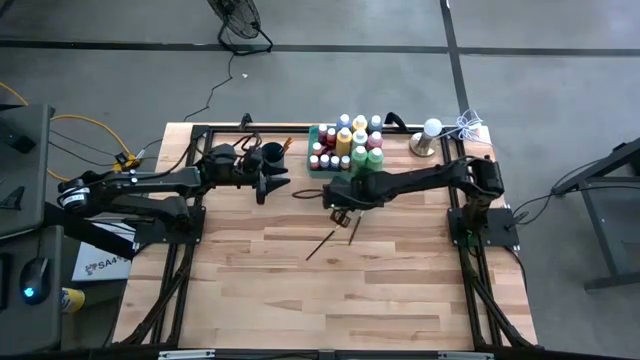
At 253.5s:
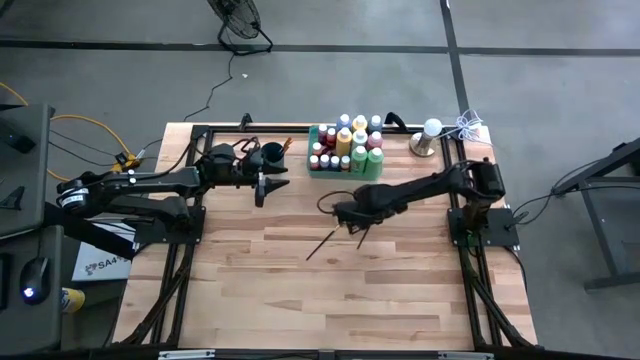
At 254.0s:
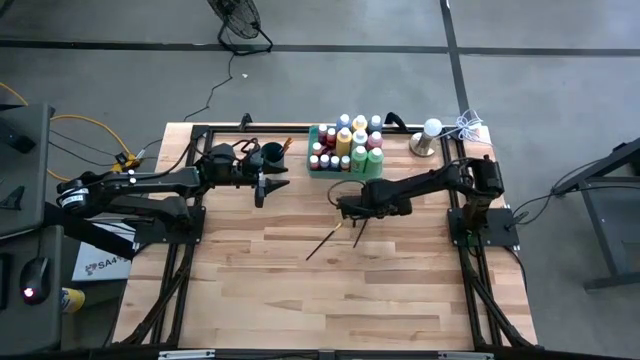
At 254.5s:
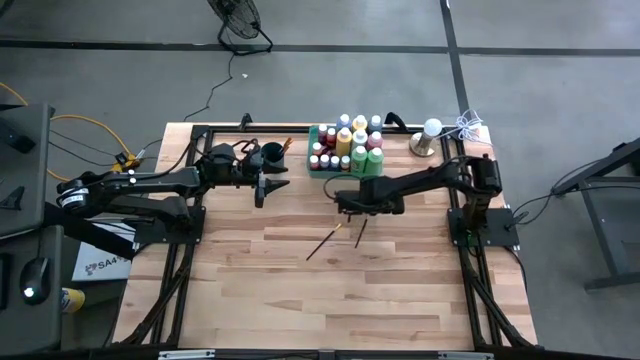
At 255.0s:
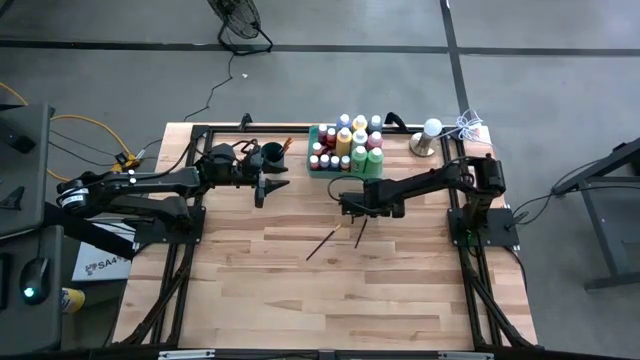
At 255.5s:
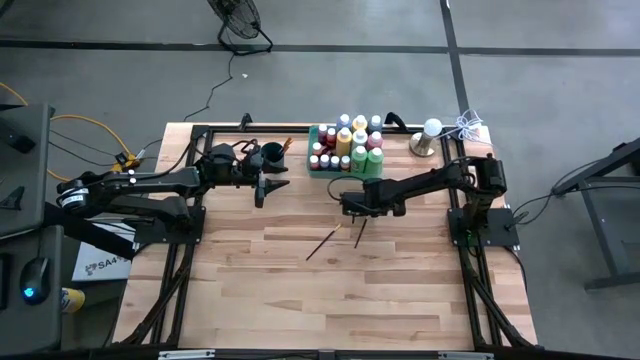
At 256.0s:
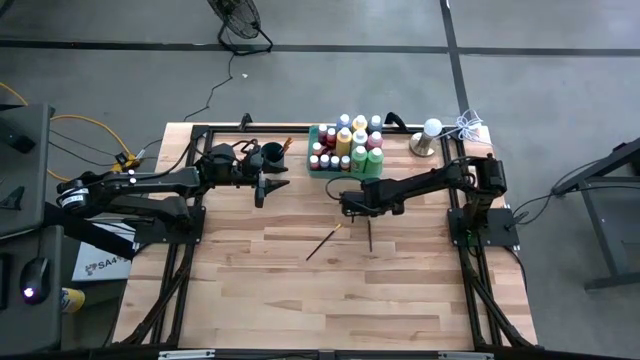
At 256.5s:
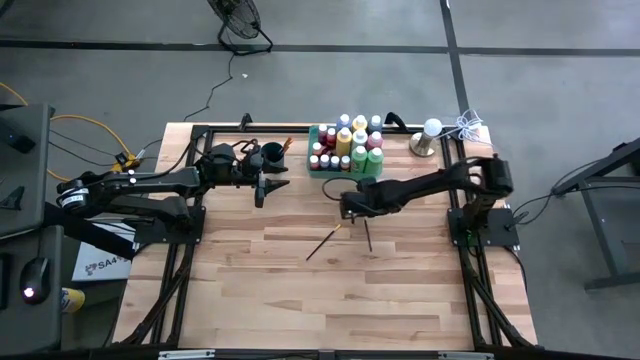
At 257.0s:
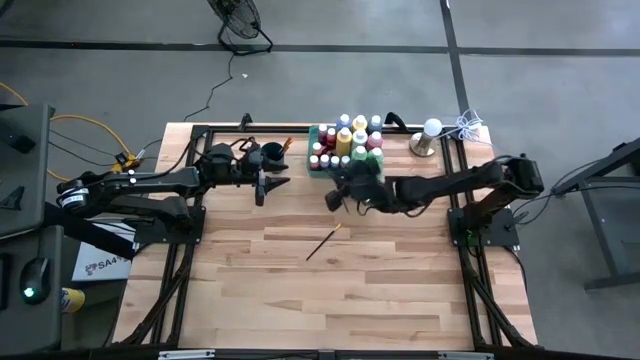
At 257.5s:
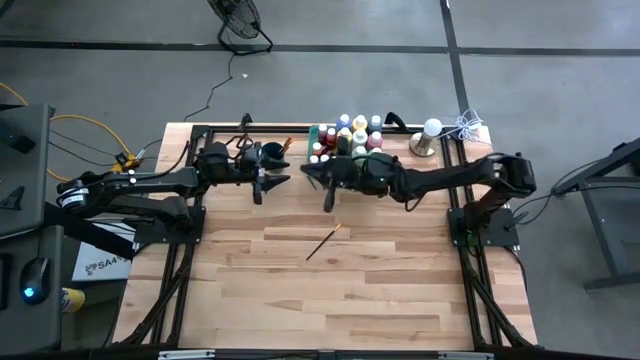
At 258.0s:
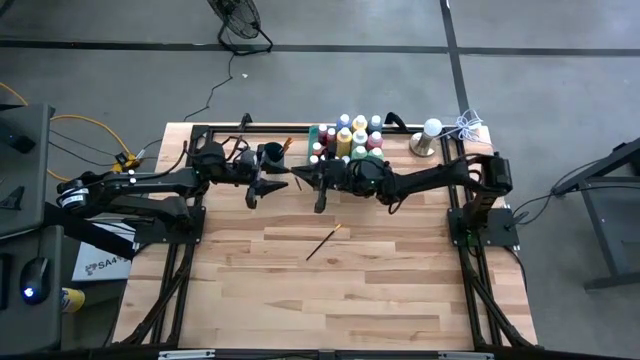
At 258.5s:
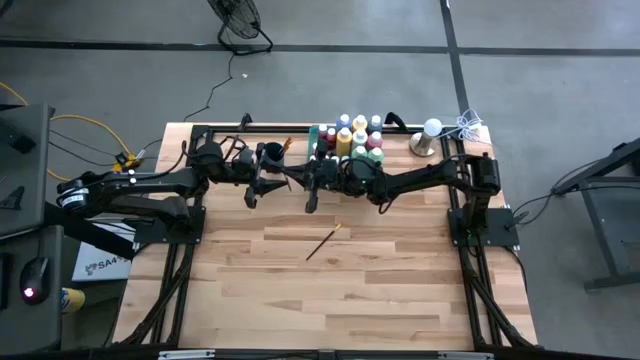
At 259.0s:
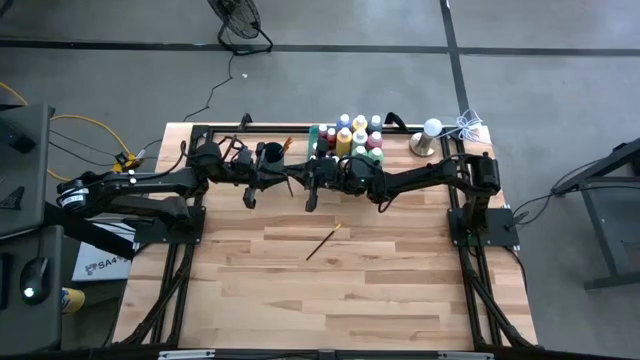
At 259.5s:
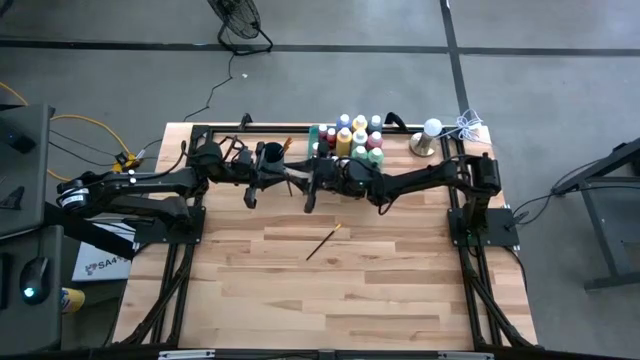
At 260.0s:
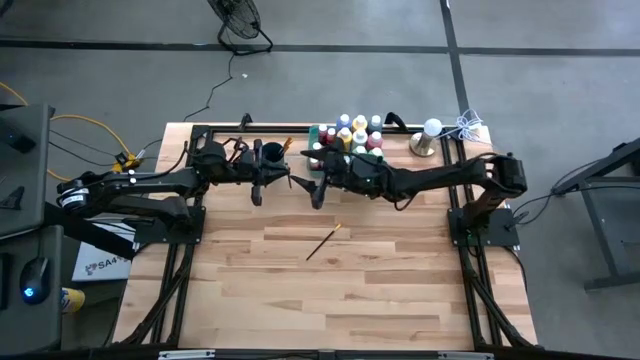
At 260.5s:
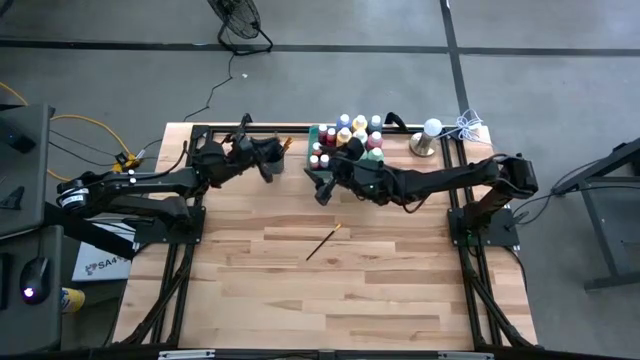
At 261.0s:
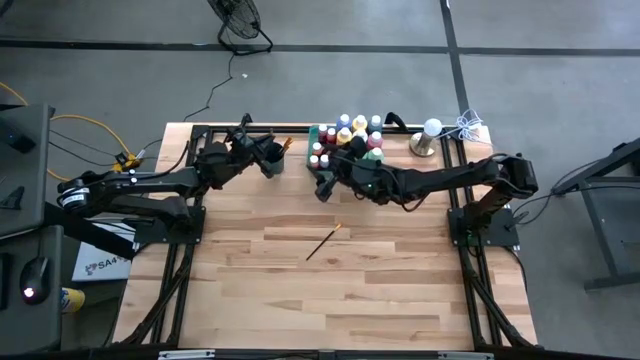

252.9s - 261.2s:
Task: Pick & Place Paint Supplies
Put the silver black paint brush into the blue cup

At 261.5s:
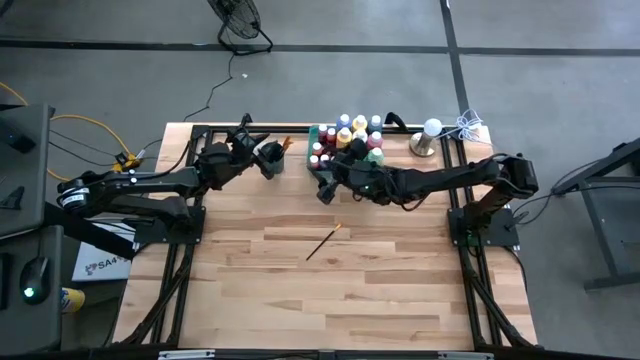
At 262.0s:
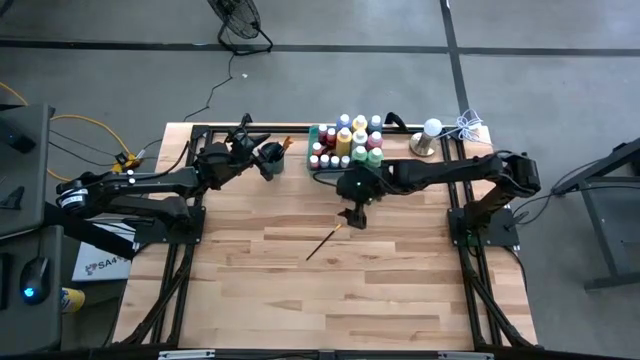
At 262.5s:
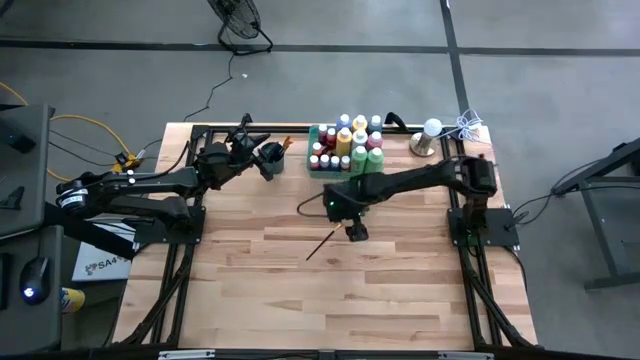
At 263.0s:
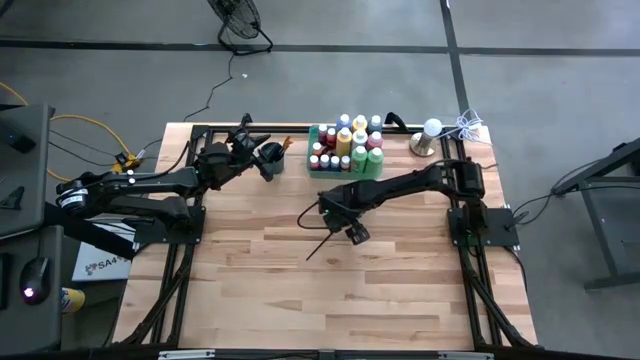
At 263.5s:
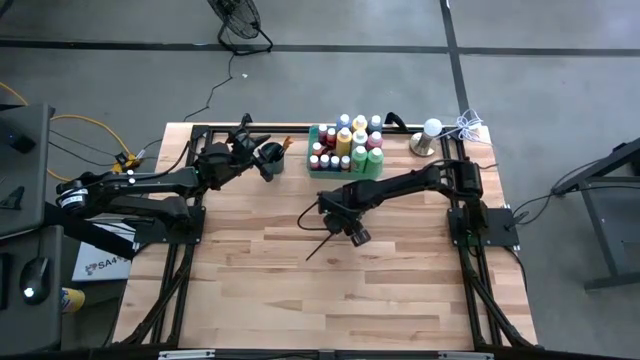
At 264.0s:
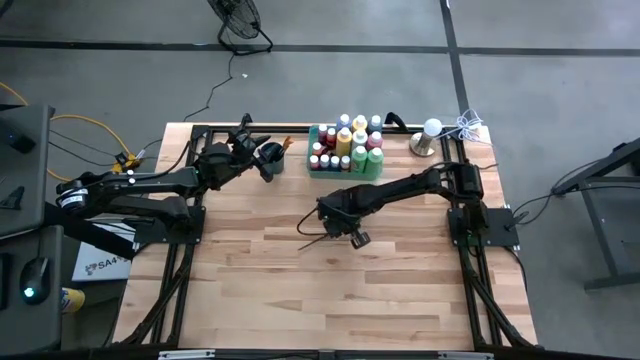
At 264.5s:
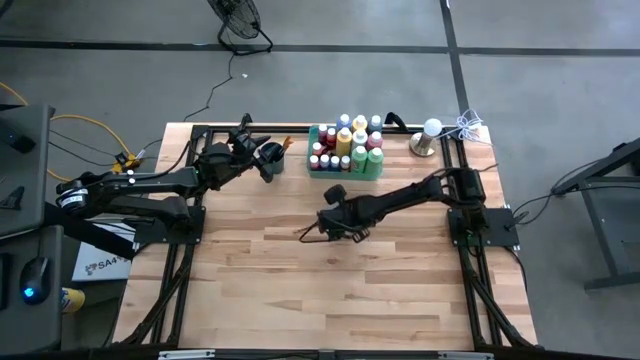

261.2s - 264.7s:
Put the gold black paint brush into the blue cup

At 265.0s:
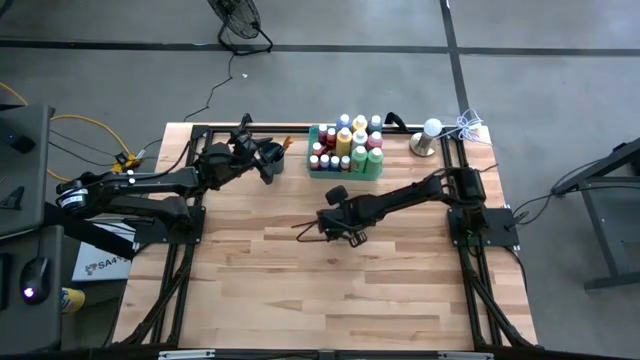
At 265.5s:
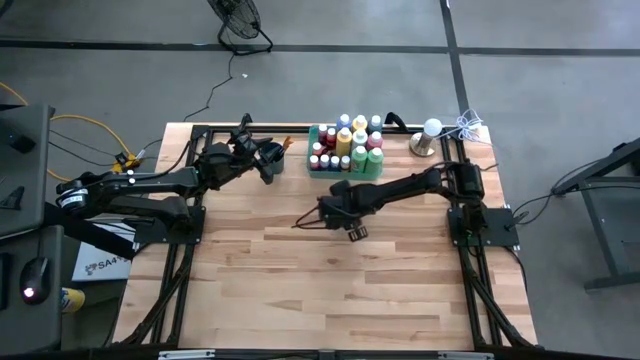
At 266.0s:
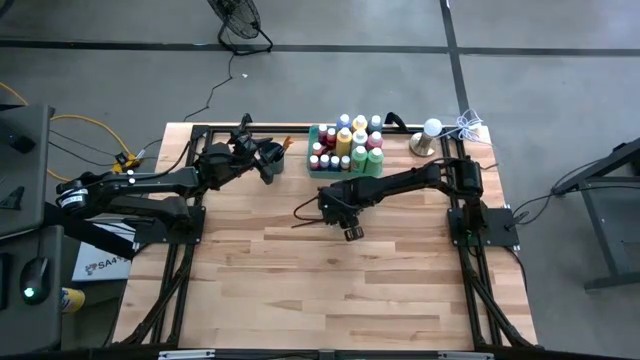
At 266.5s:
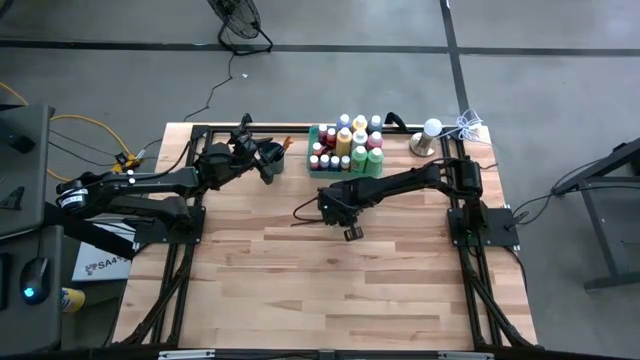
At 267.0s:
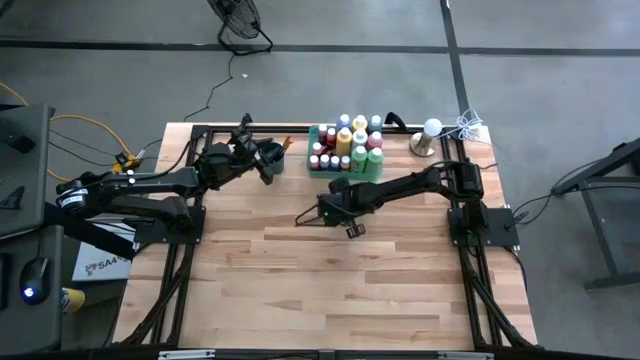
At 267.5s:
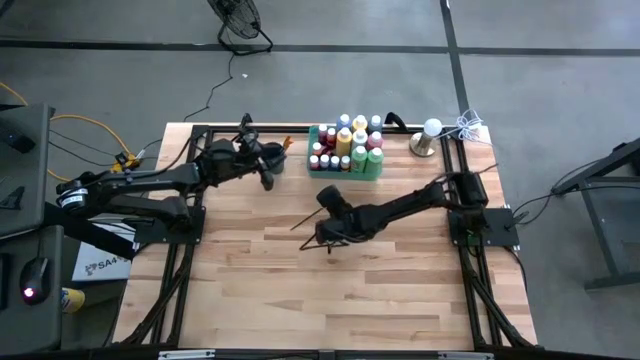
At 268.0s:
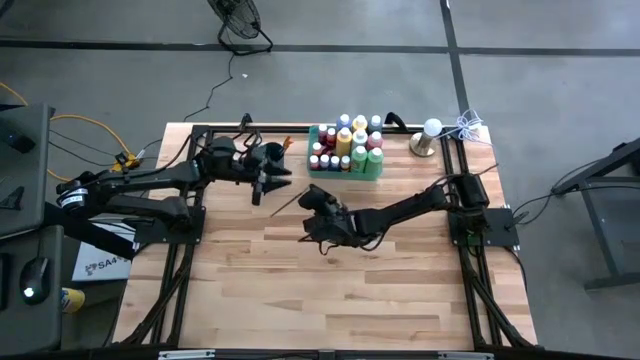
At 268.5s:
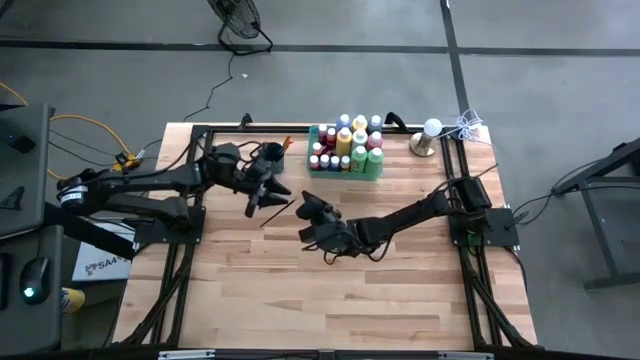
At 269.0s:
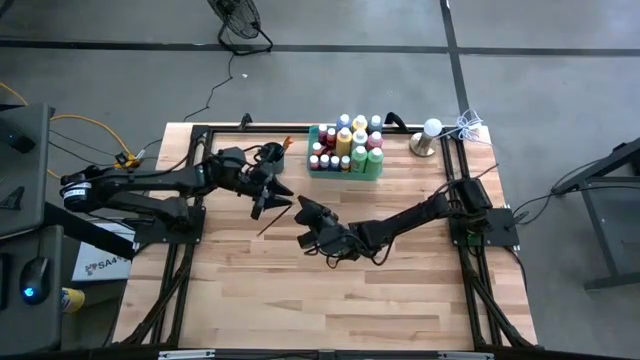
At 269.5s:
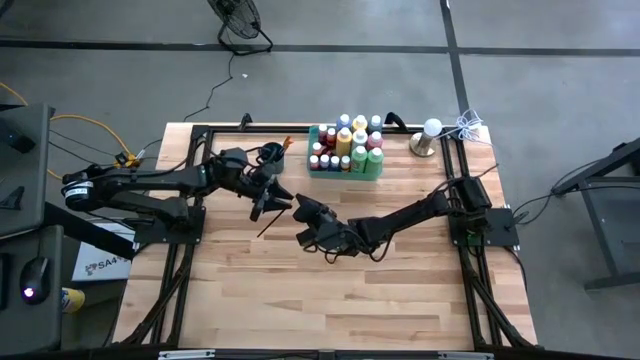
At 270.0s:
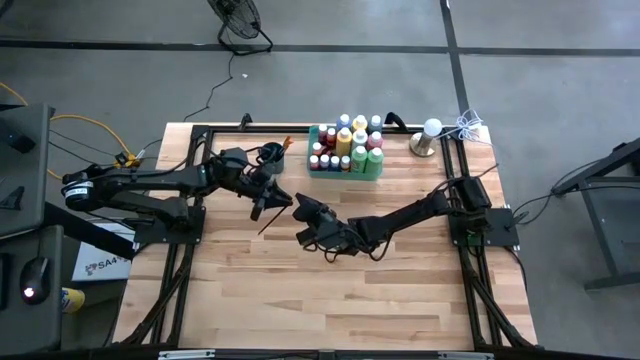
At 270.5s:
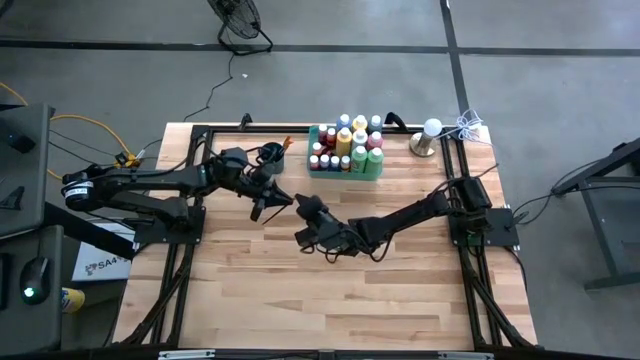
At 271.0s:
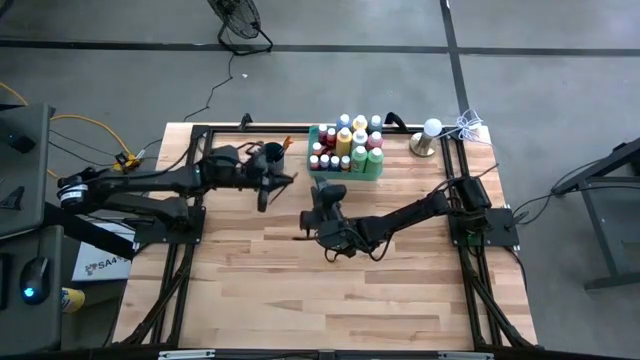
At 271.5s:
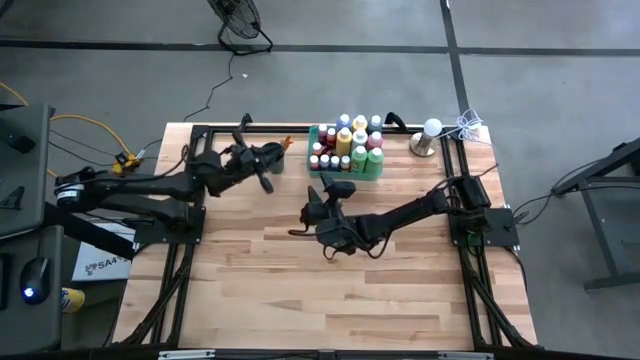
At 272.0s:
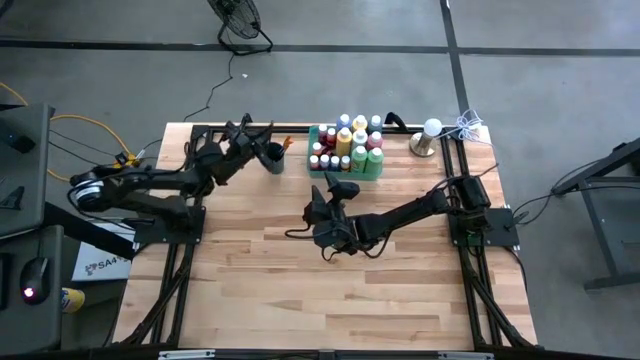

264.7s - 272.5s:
Put the gold black paint brush into the blue cup

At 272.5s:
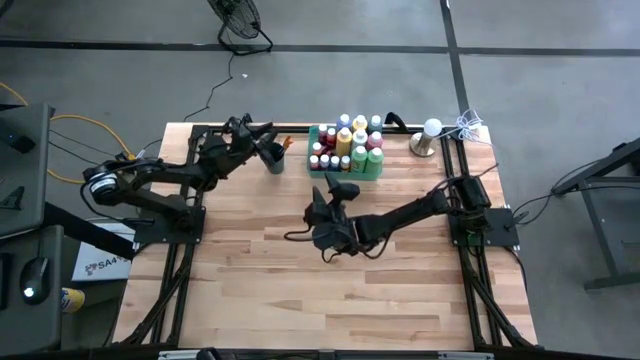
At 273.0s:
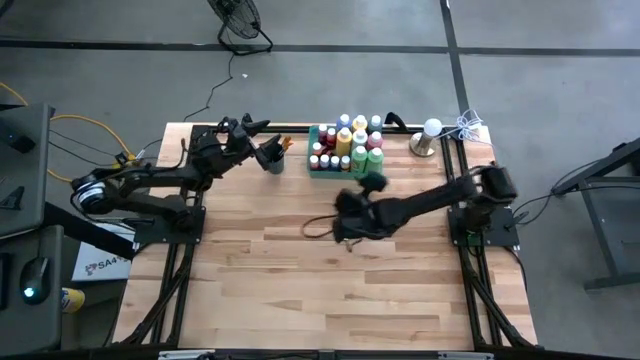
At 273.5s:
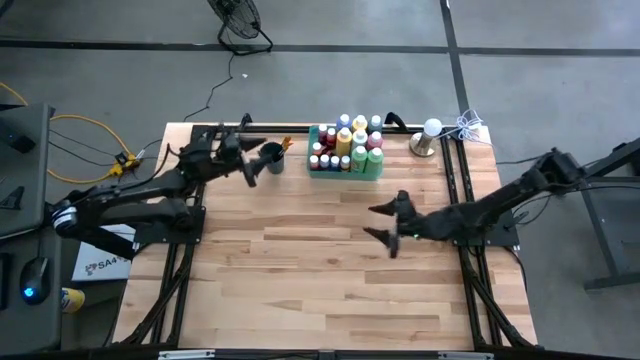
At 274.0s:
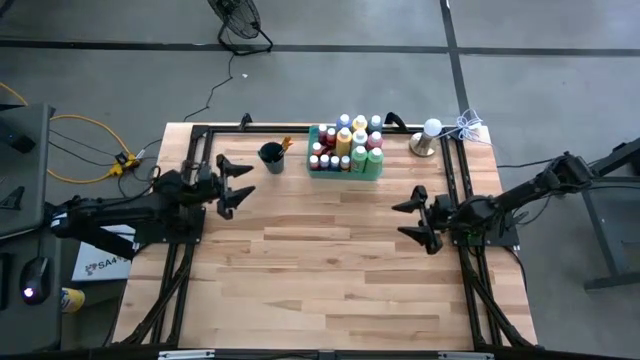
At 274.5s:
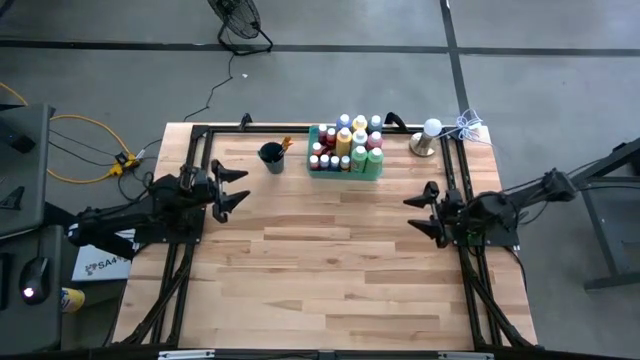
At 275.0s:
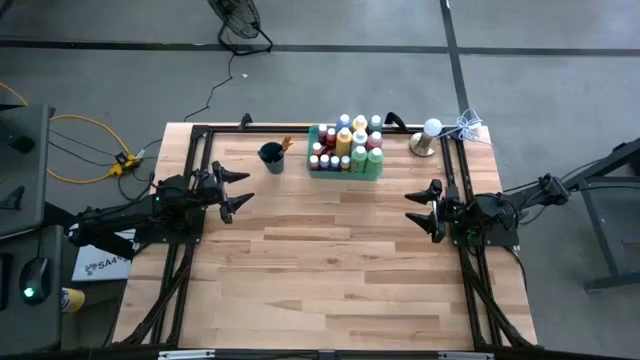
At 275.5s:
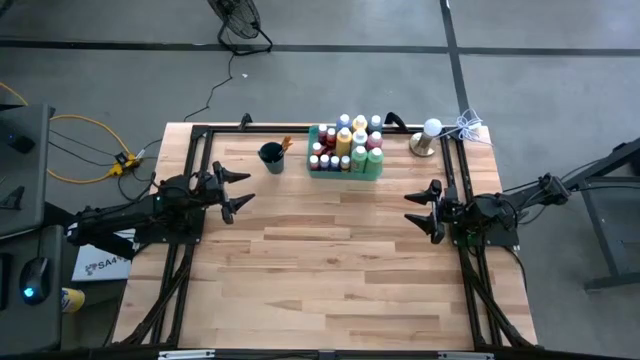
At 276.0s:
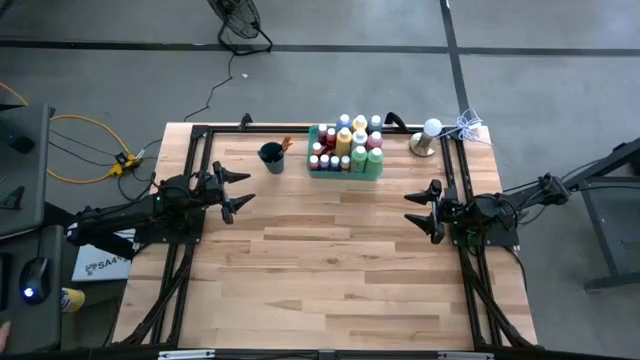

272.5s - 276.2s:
Return to Home Position
